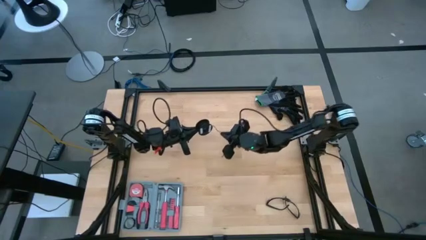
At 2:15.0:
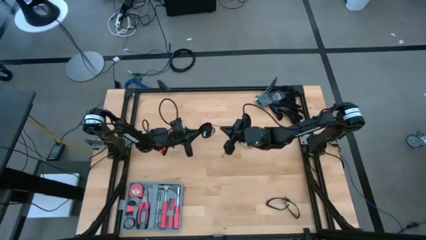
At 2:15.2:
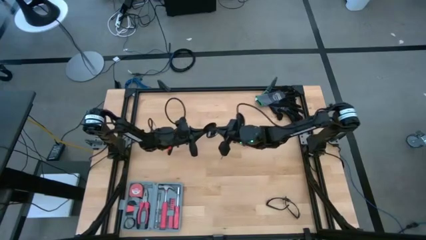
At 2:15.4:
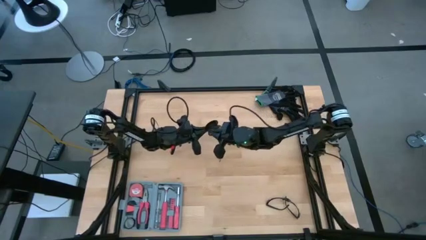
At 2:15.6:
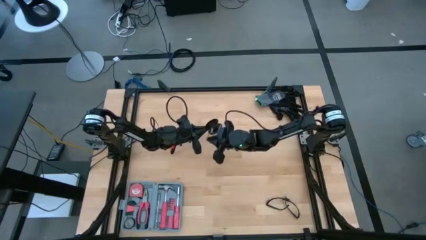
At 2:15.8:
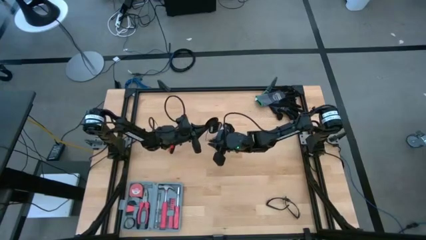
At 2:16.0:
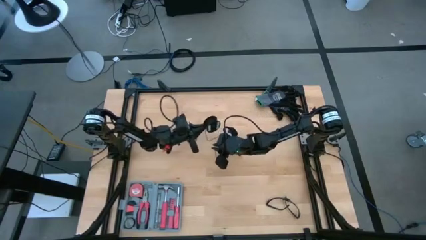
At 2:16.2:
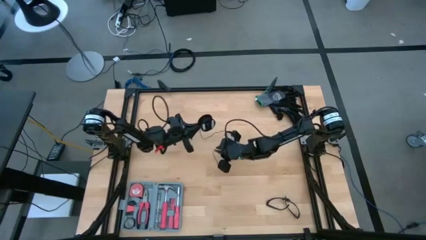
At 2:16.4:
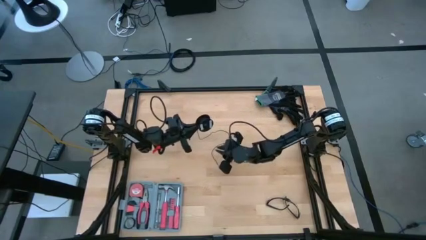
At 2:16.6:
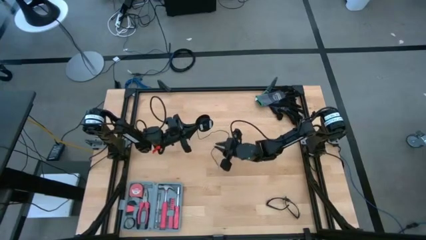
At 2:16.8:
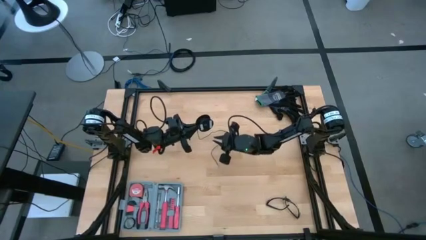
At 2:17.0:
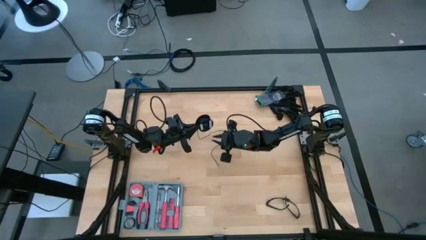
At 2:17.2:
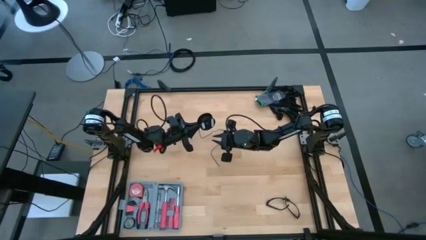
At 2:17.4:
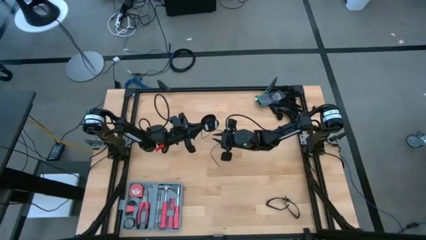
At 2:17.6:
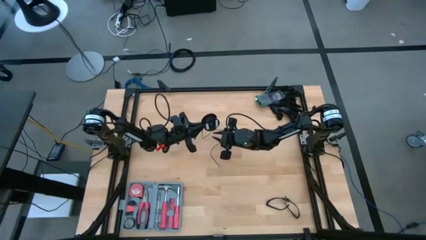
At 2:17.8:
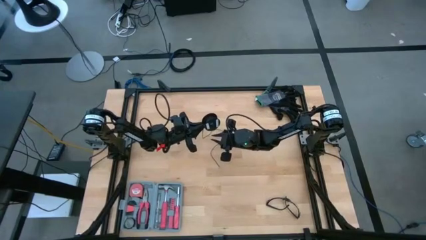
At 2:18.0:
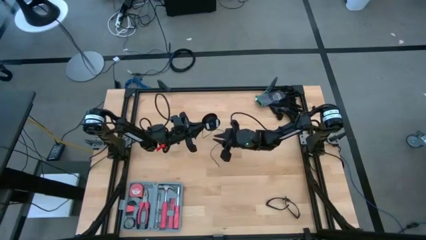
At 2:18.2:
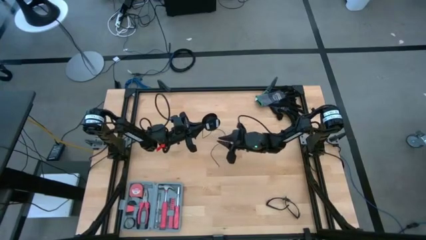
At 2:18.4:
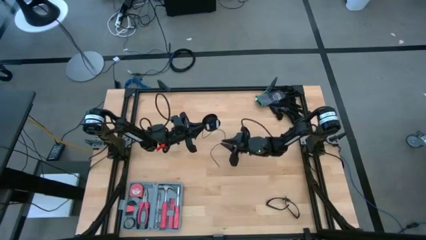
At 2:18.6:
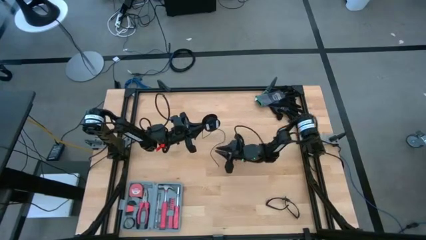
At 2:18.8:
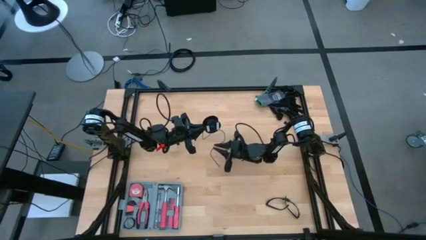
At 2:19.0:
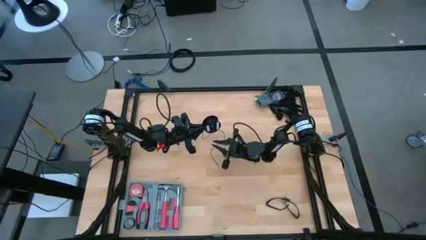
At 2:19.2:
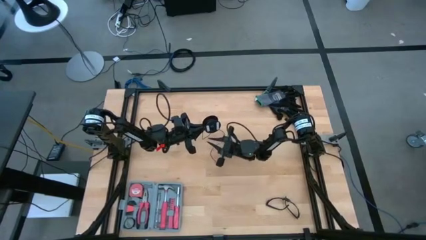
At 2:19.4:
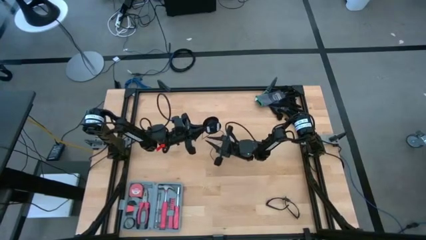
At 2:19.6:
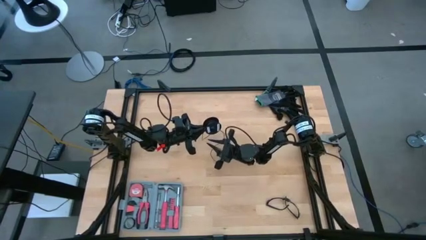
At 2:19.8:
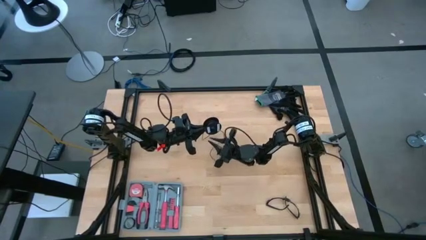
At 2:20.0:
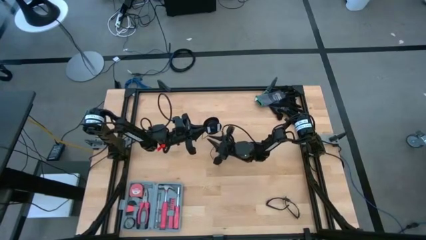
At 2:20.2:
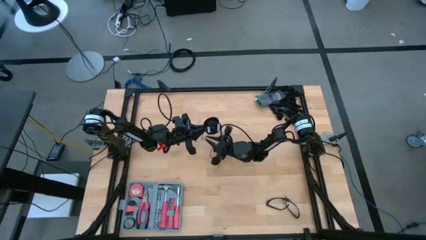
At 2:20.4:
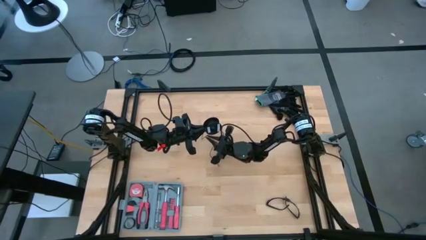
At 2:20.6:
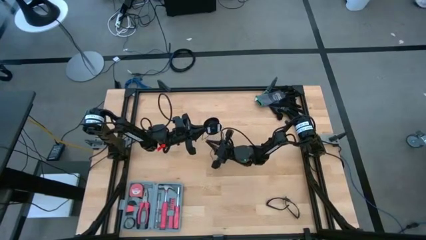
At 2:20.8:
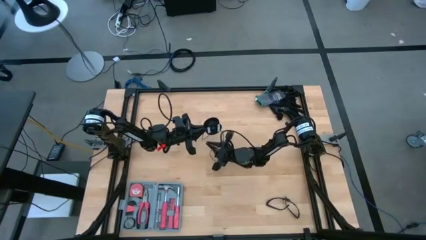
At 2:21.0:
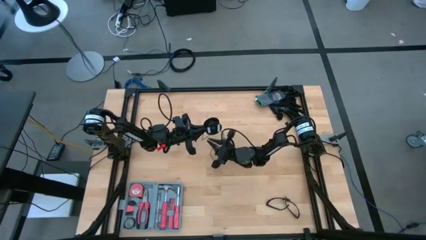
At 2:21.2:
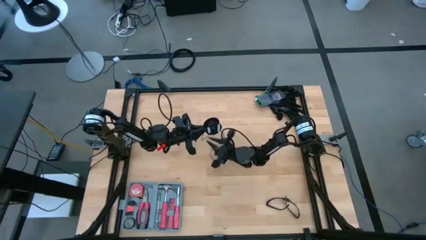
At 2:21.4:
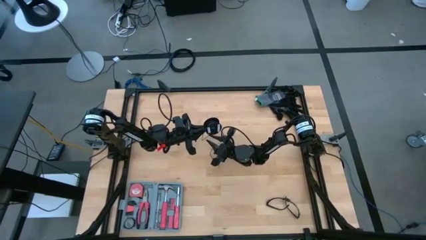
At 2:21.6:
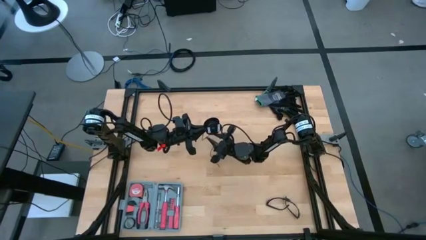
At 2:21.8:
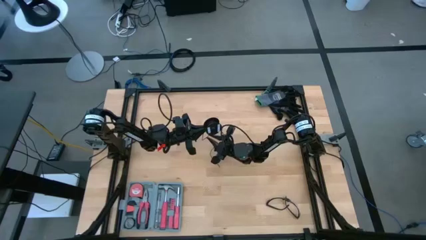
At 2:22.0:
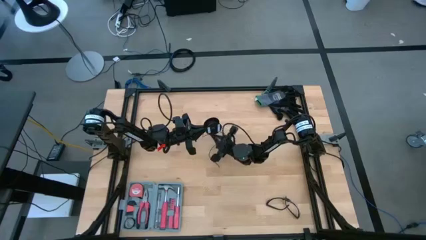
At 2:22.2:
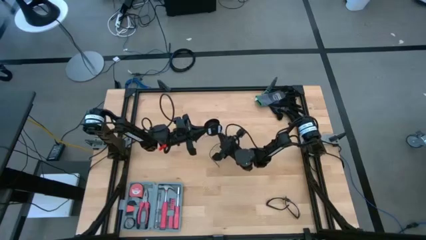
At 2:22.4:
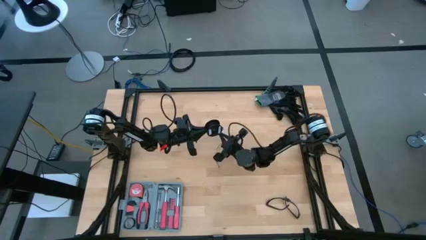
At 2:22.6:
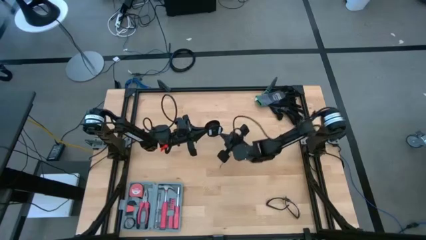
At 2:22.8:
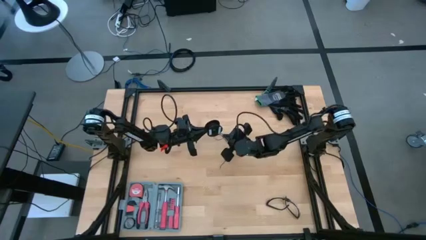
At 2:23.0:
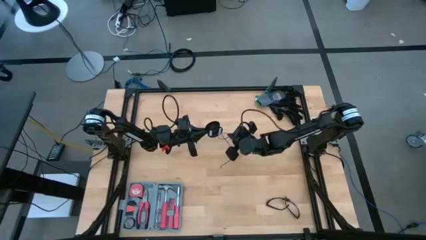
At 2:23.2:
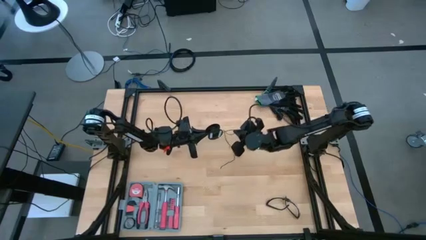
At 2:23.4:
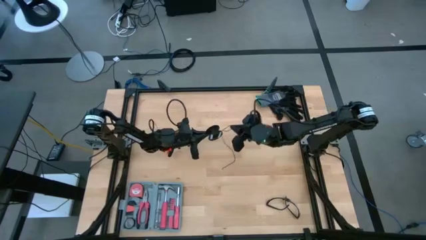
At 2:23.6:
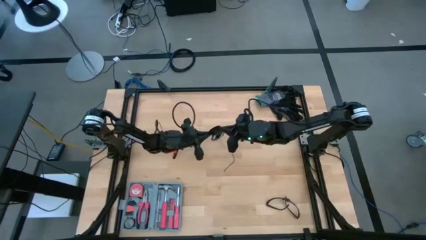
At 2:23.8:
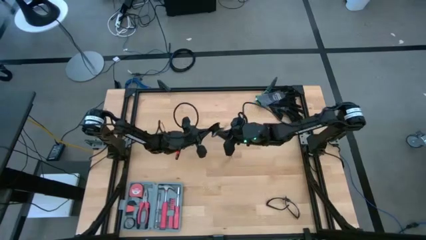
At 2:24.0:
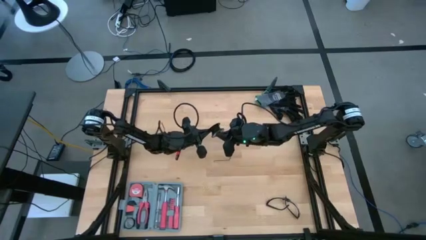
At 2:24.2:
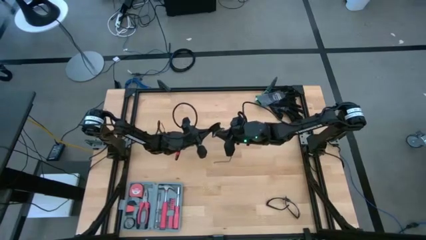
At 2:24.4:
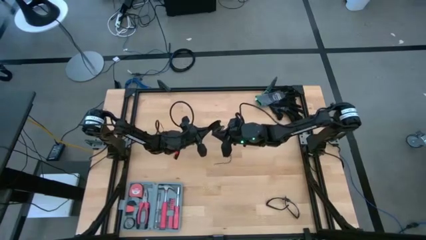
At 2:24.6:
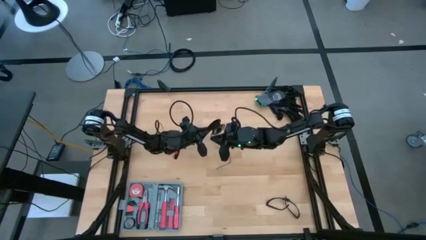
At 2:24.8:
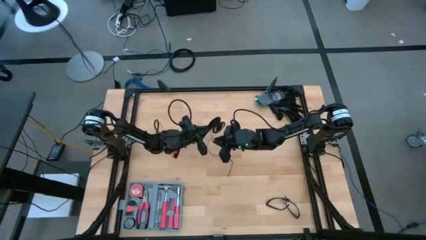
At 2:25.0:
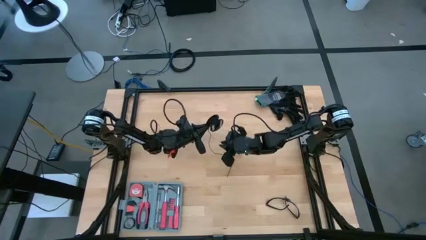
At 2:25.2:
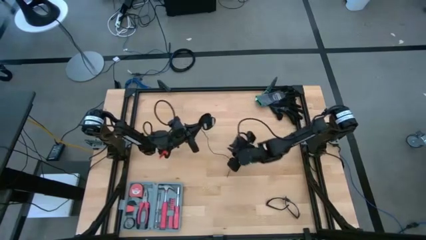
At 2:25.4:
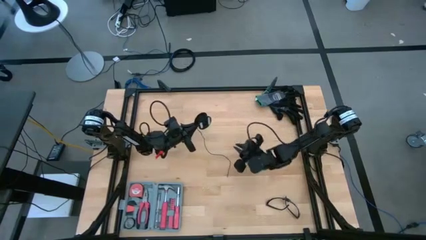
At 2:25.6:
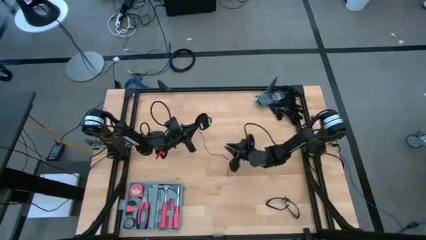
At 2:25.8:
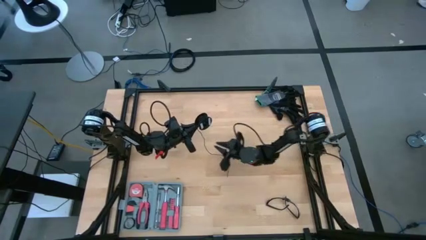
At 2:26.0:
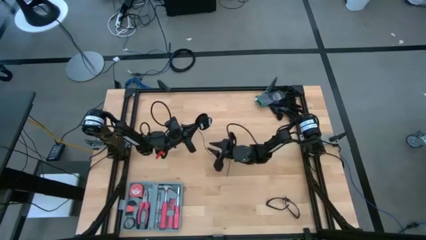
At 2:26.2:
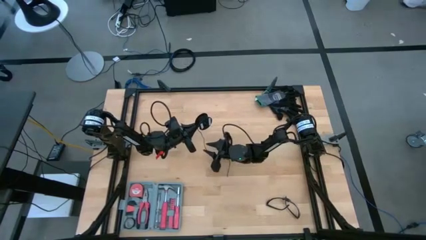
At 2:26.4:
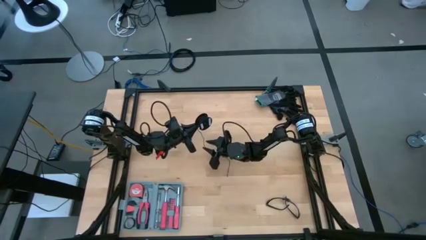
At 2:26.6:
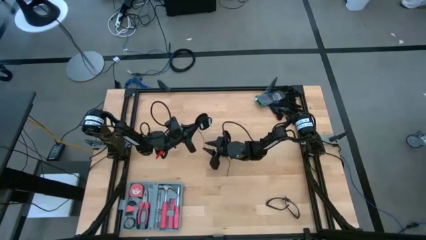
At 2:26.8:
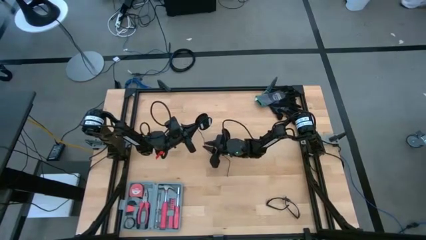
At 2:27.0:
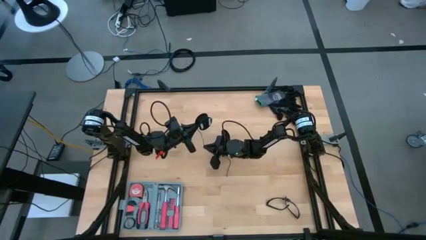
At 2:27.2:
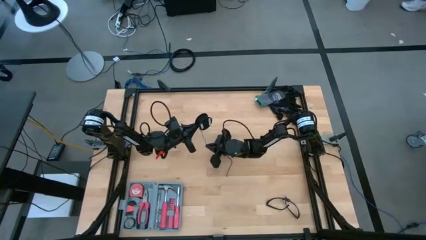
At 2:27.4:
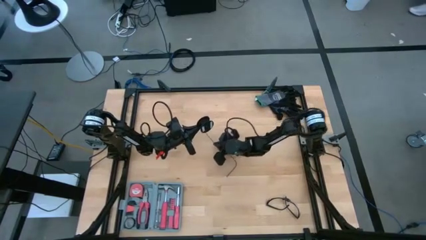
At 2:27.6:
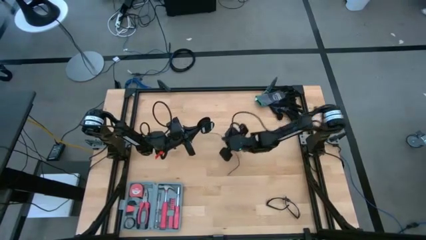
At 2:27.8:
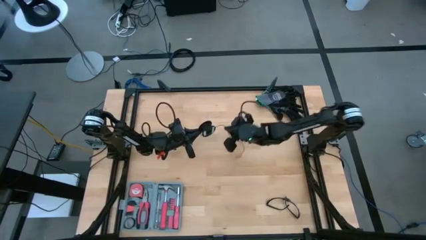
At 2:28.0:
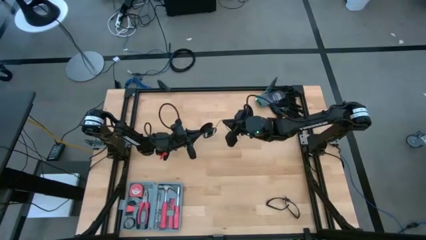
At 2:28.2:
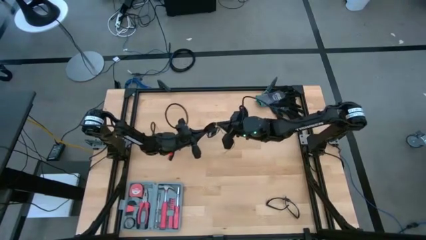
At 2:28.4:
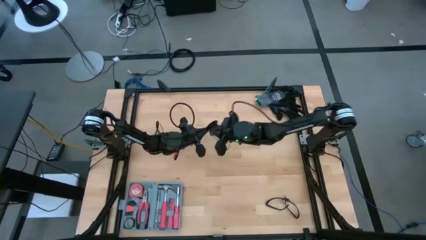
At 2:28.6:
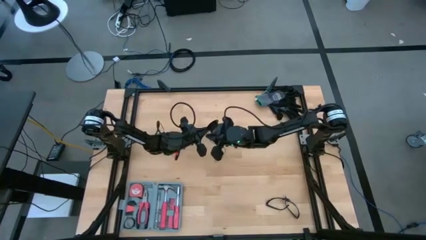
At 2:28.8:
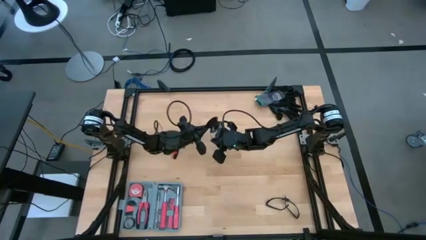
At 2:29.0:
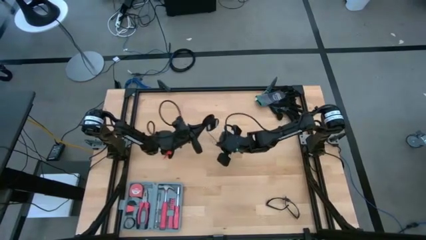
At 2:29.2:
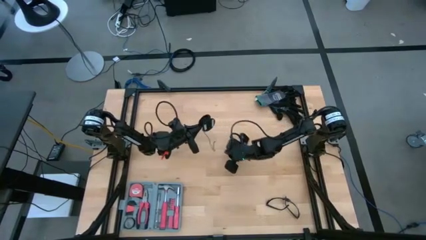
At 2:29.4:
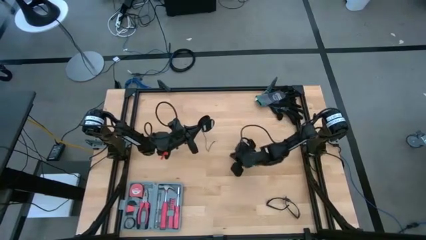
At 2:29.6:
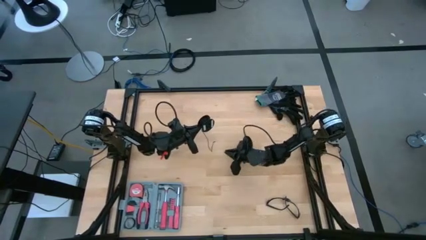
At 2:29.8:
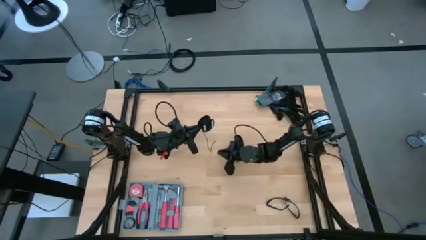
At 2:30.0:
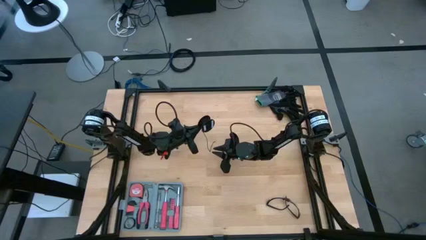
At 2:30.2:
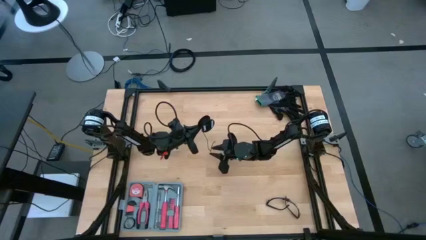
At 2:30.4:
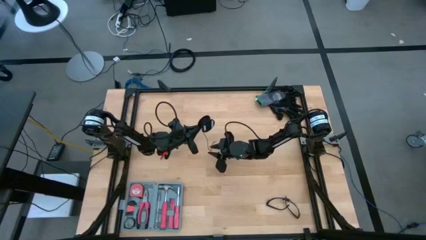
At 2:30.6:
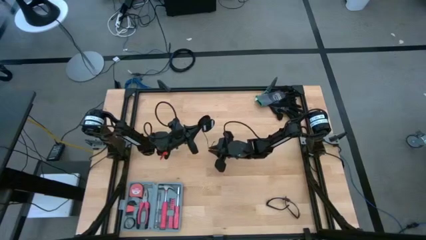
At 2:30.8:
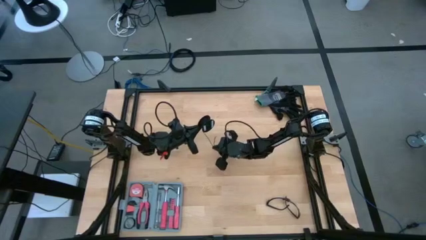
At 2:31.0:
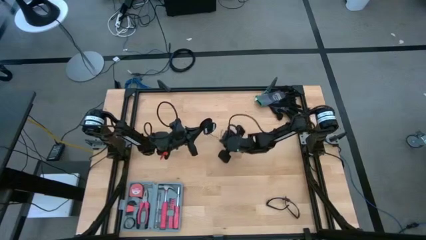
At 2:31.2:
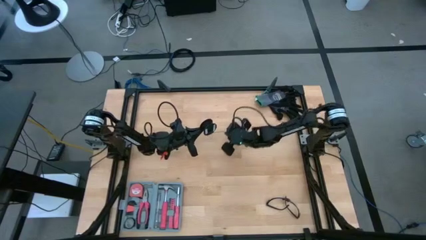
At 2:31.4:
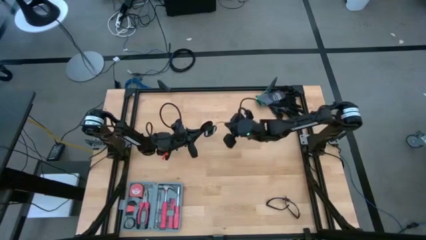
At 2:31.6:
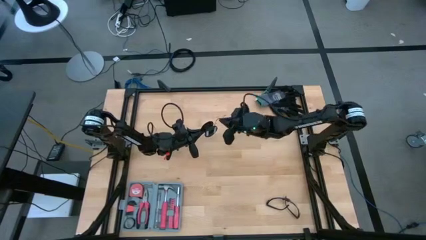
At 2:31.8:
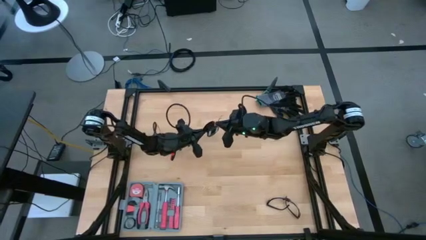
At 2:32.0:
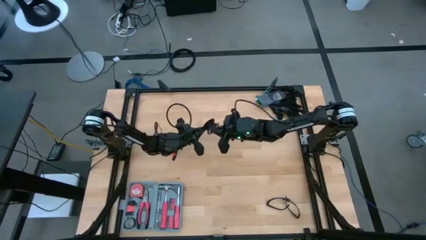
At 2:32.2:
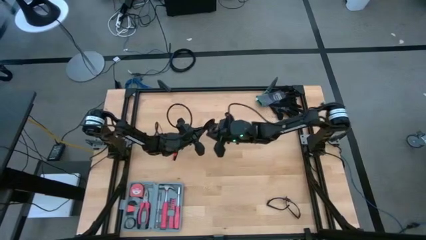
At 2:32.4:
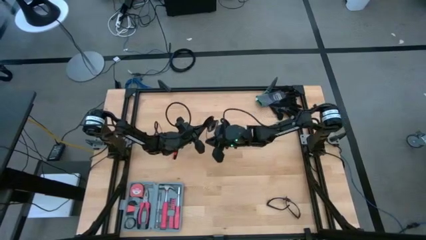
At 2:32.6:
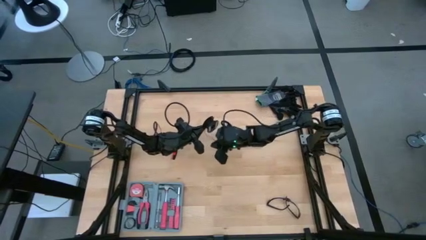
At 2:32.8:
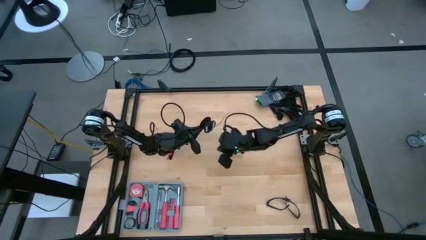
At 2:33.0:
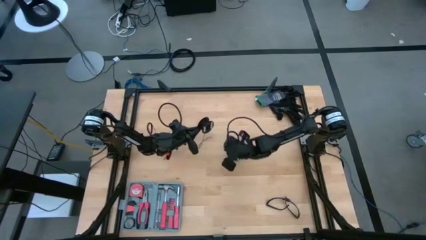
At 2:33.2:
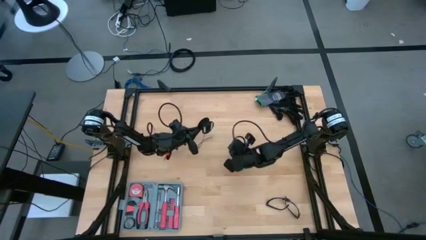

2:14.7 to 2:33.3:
Task: Coil cords
Coil the black wire onto the spool
